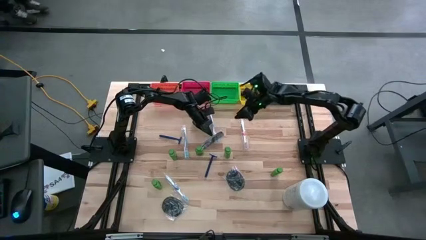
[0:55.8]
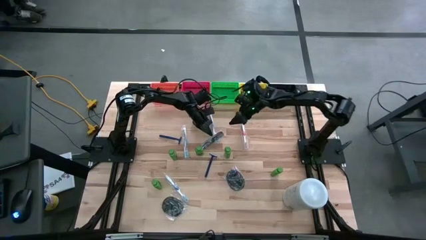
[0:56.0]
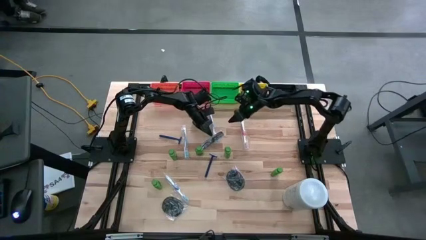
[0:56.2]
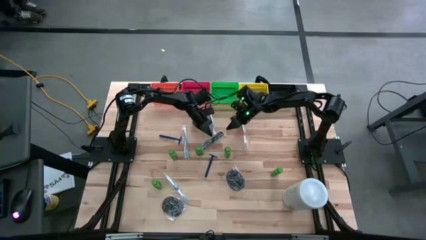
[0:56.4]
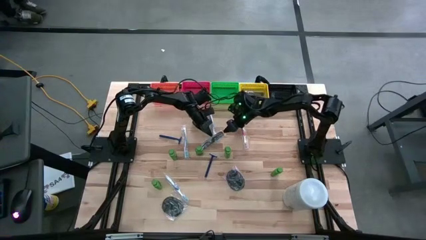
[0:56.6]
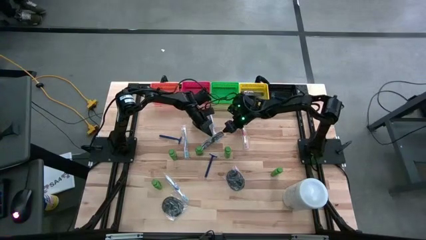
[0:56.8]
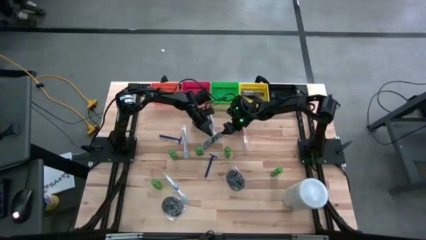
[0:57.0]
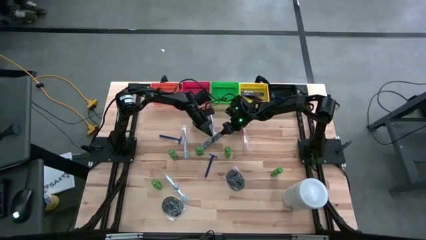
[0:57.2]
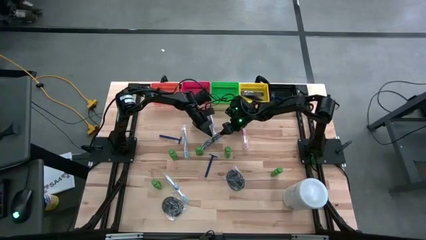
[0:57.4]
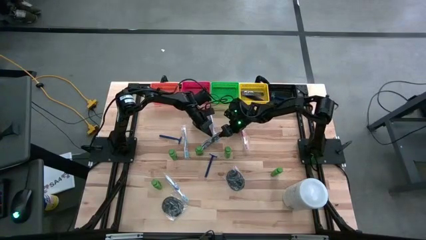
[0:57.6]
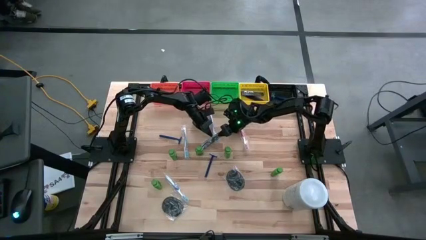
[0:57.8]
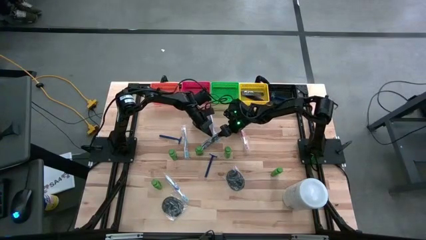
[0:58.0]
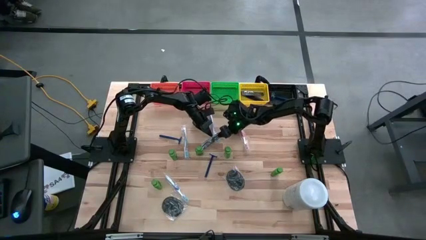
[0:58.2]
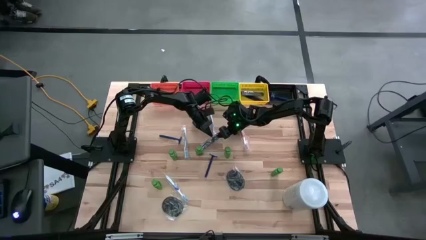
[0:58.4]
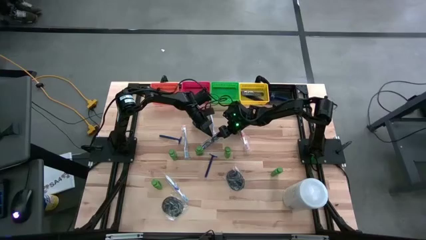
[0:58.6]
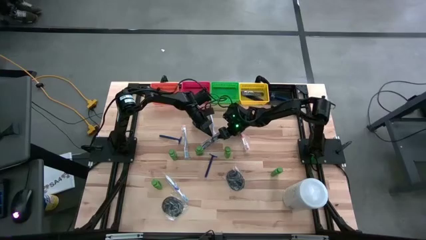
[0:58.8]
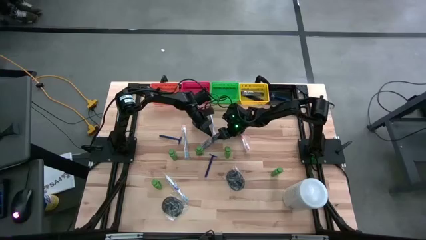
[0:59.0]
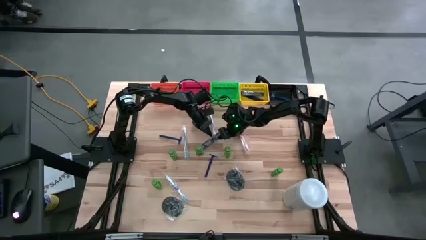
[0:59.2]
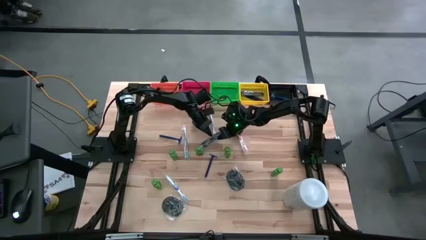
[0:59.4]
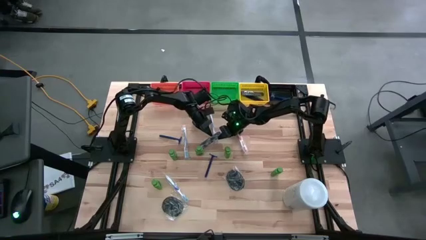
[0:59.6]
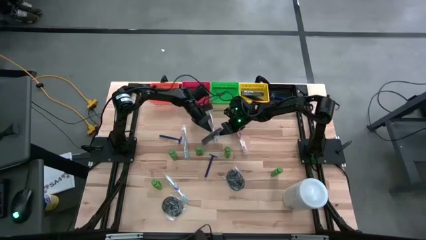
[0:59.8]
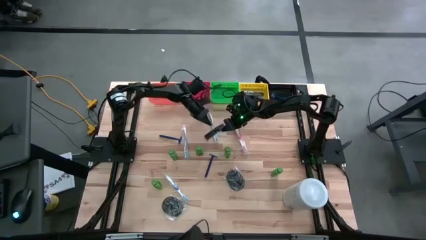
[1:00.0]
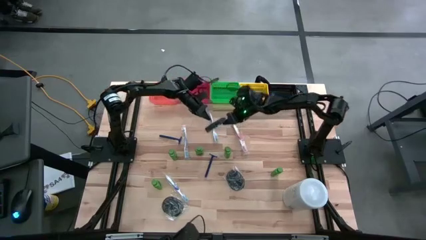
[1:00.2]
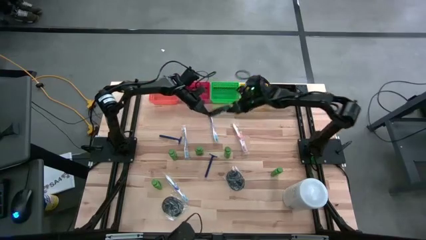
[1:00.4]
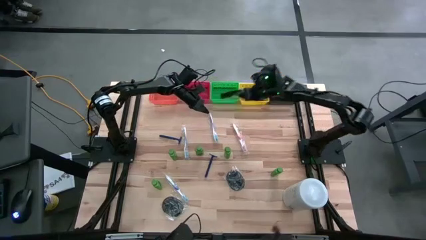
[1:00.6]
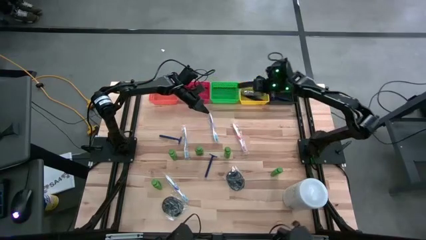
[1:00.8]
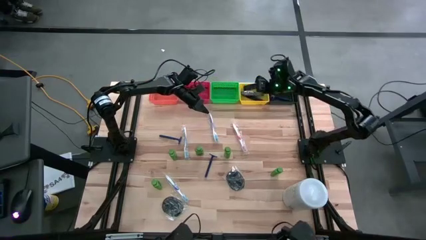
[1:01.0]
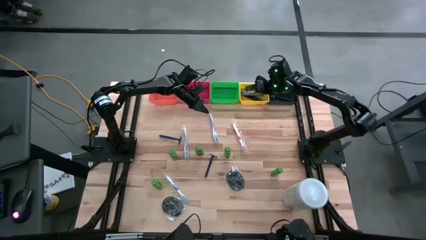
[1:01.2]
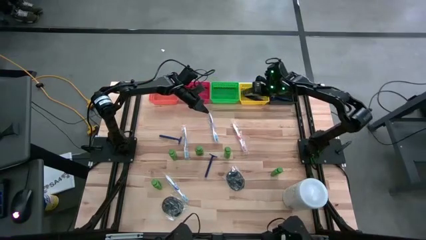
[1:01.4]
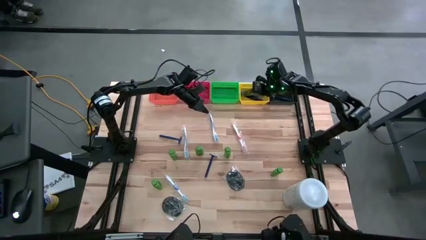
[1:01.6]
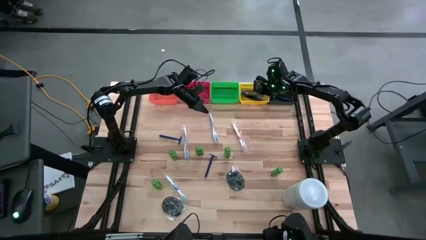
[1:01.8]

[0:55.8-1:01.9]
Task: Pick & Place Travel size toiletries
Put the black hair comb into the yellow bin

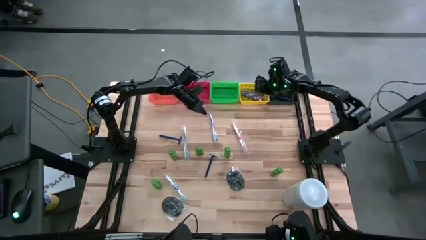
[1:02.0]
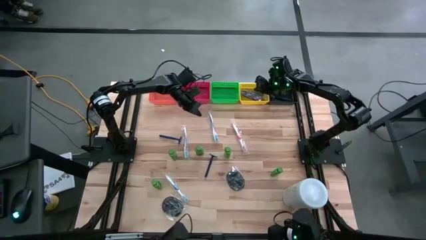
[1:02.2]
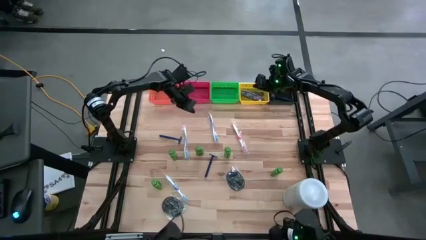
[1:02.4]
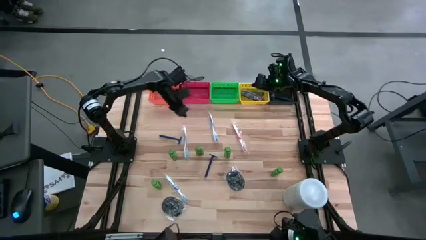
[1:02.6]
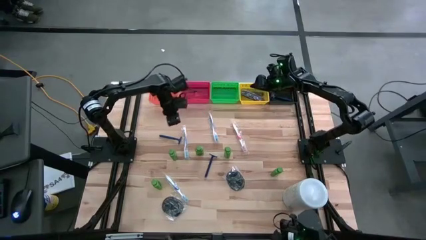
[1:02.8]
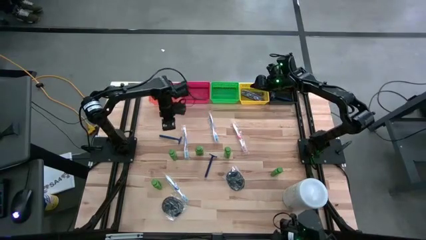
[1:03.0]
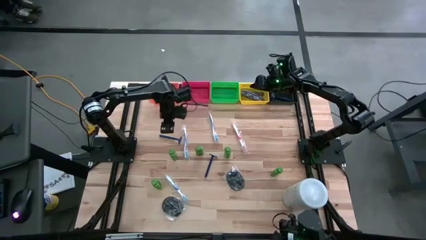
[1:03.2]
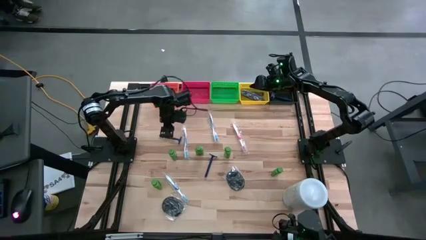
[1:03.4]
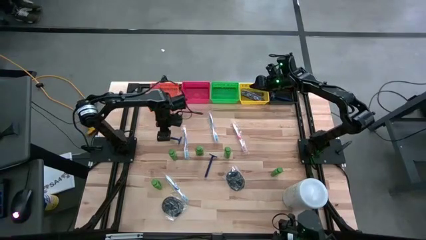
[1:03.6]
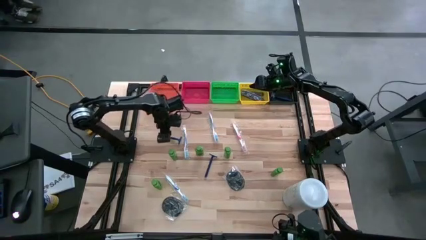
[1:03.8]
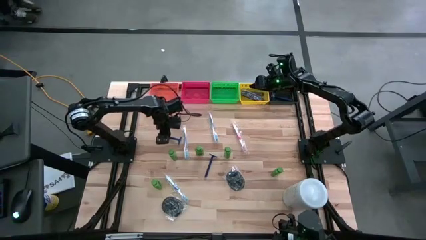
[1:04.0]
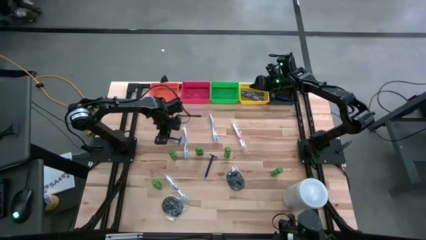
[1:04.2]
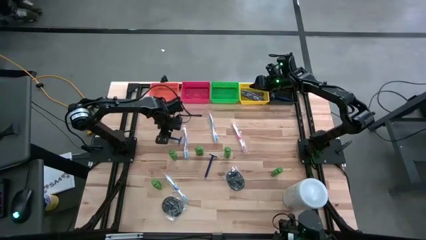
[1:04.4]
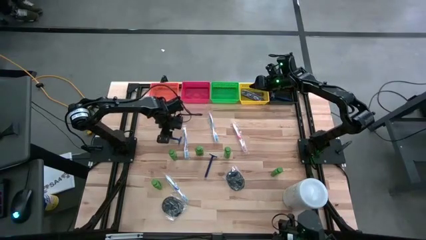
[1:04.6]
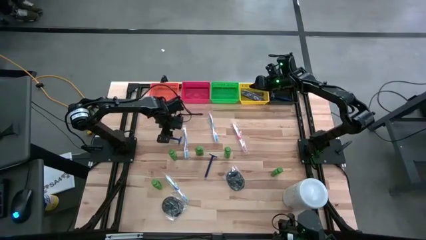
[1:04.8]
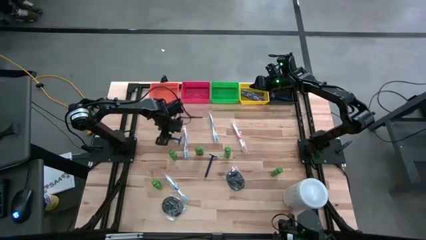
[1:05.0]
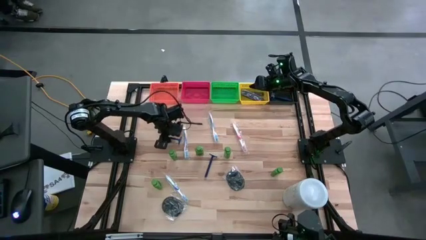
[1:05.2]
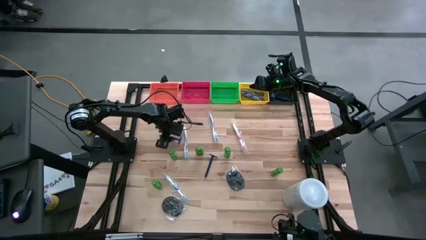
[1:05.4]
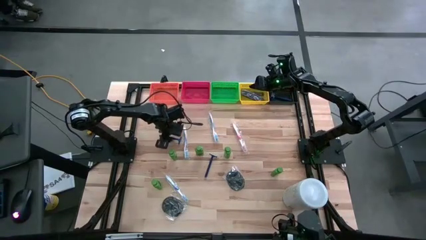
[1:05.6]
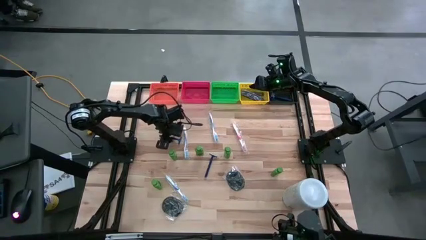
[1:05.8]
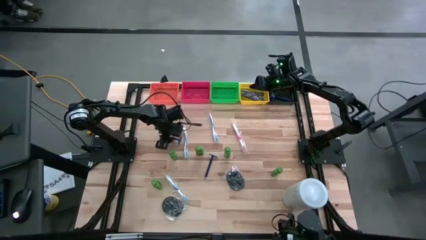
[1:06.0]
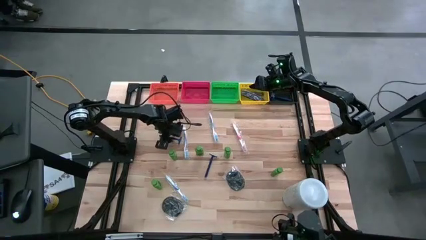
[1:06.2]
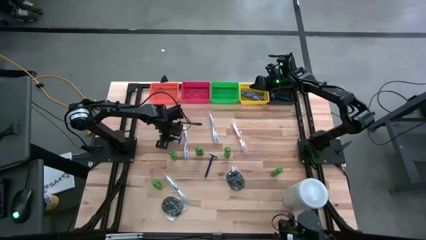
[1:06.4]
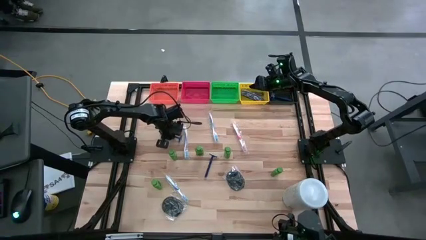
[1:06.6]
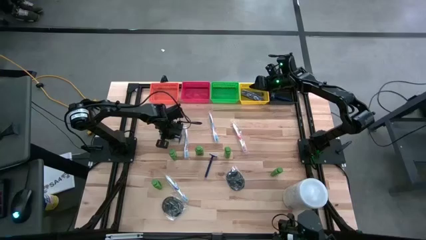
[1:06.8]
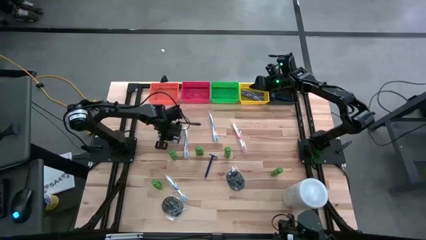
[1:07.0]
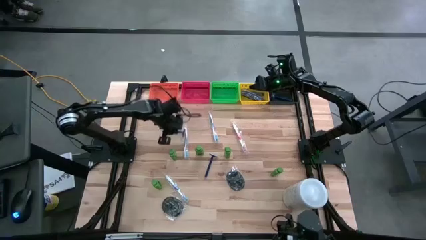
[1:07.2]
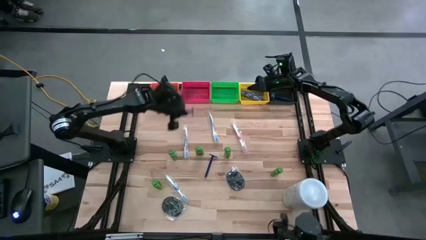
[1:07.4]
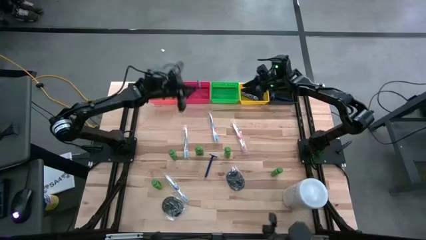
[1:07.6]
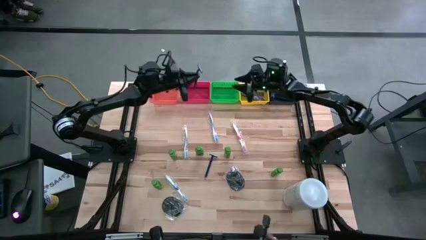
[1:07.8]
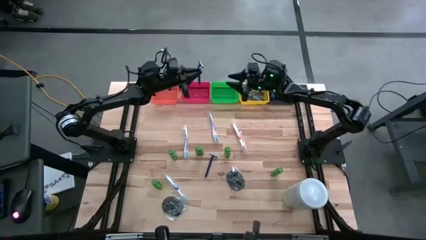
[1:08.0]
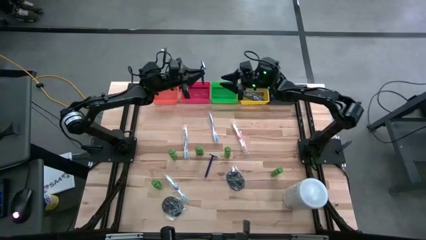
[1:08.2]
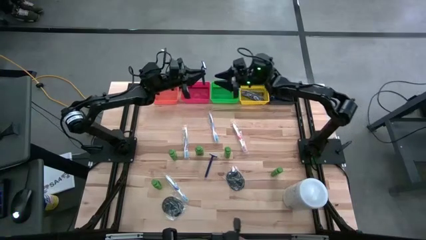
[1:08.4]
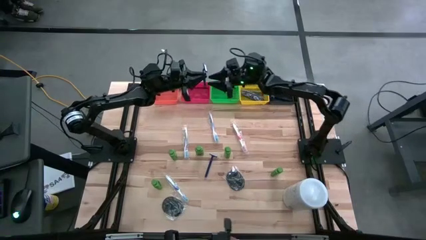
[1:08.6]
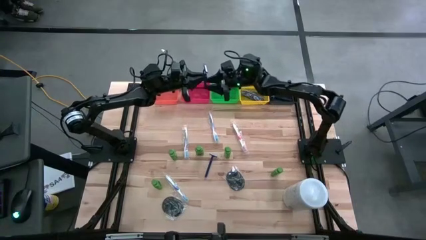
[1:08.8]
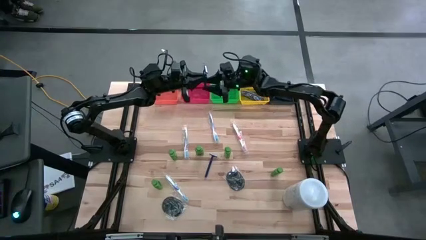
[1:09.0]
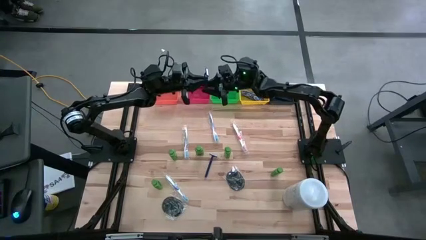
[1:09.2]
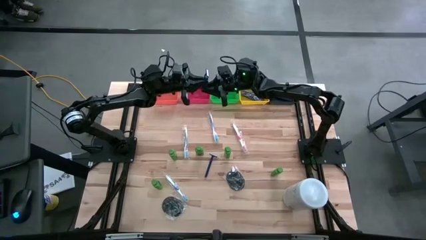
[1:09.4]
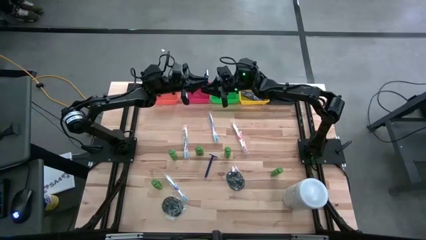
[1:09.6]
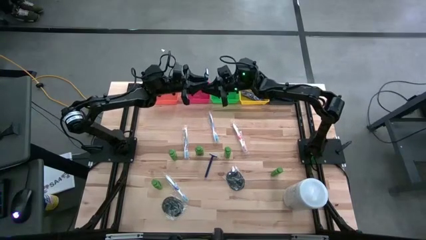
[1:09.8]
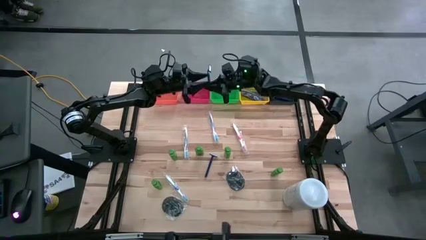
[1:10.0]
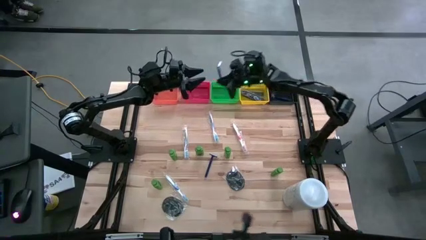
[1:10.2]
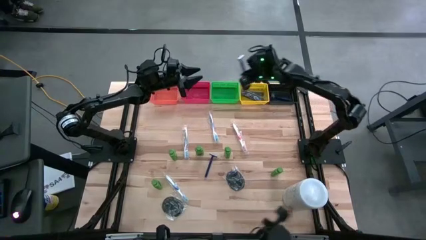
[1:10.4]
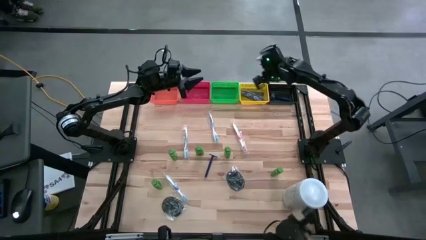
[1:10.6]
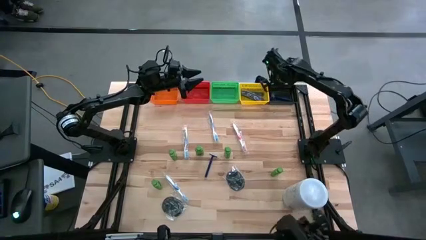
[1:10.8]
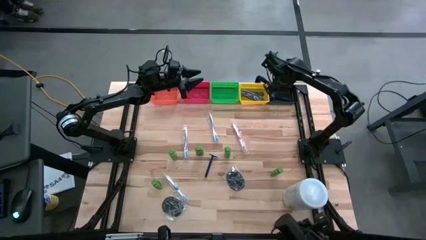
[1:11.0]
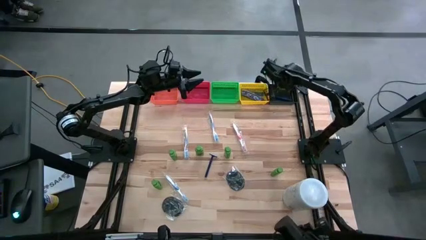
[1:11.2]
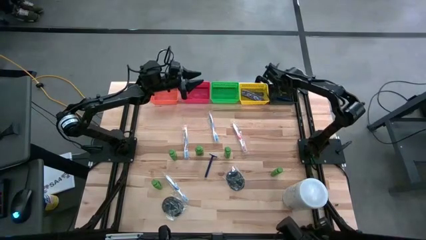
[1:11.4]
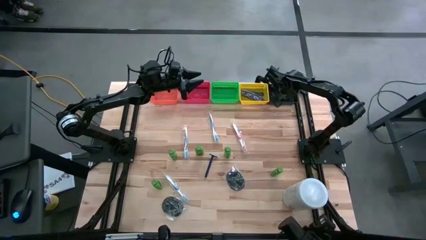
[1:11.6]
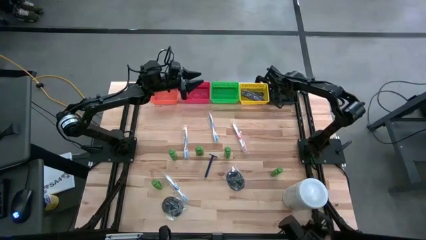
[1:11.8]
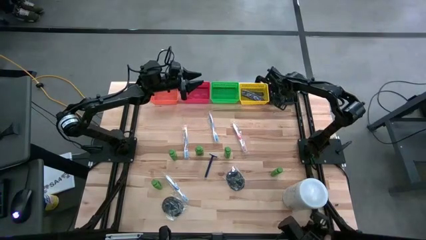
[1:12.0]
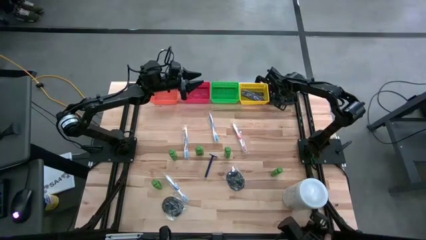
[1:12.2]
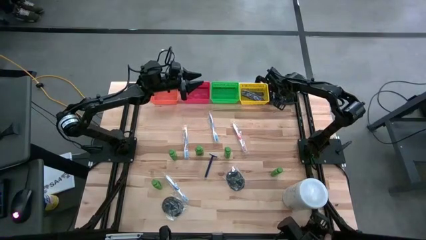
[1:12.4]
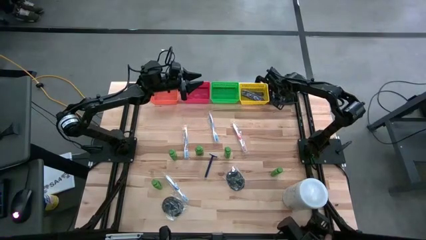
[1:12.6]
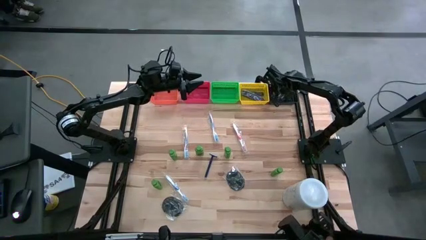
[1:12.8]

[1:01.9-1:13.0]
Put the blue razor into the black bin

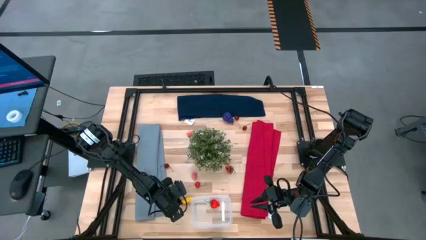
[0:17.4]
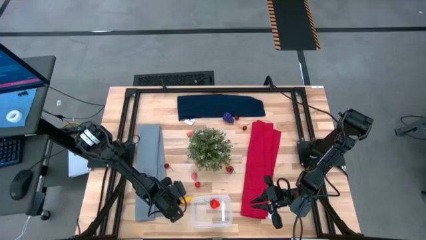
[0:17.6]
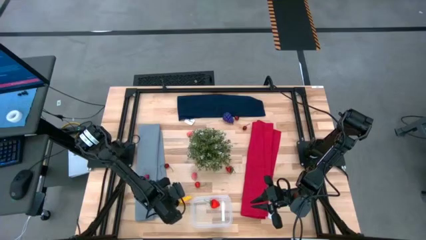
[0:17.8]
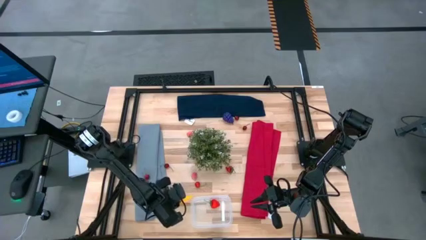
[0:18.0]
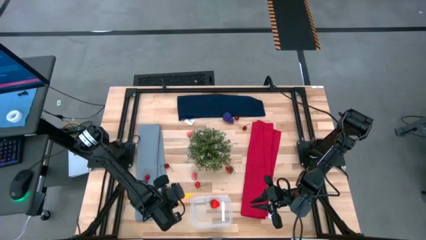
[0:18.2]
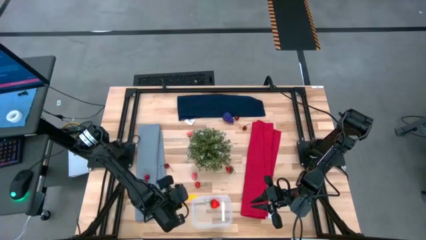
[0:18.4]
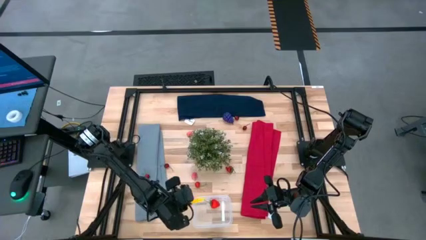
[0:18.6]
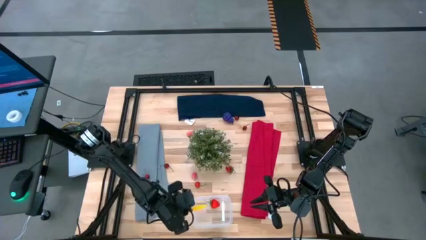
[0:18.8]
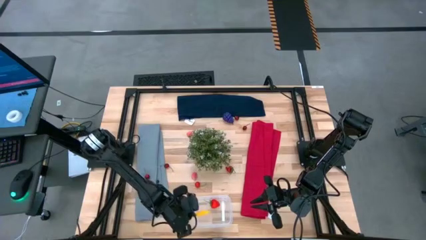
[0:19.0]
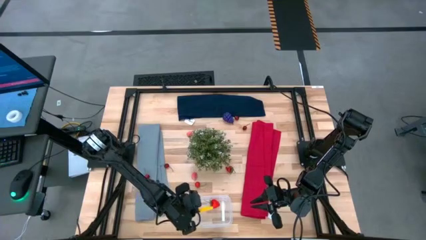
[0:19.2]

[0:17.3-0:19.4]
Task: Pick and placing Produce into tupperware
Put the corn into the transparent container
